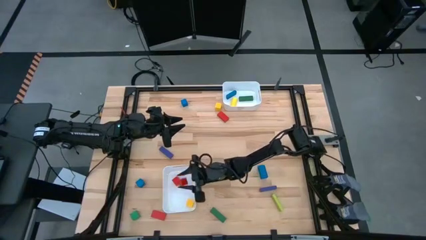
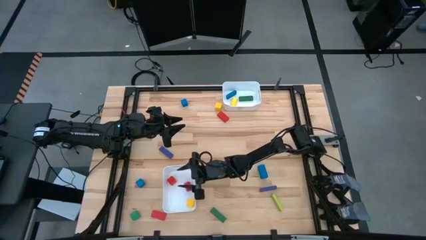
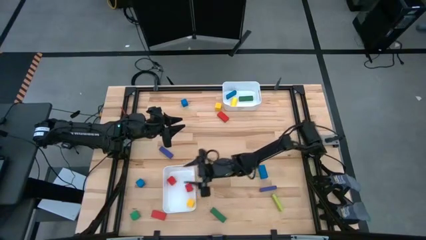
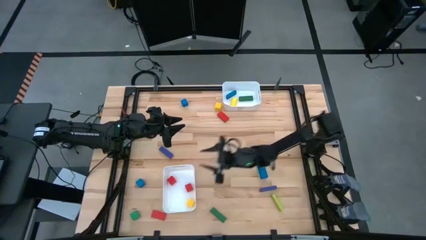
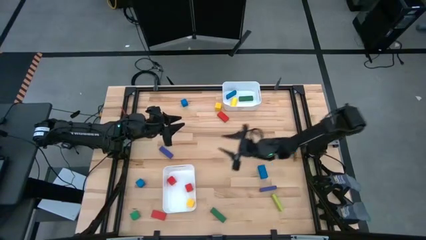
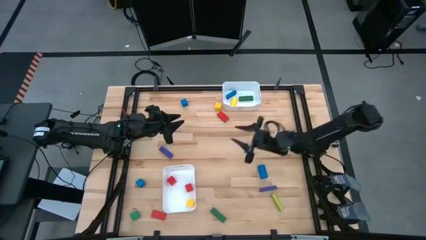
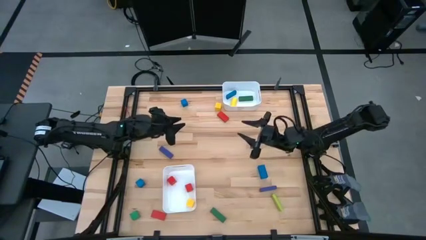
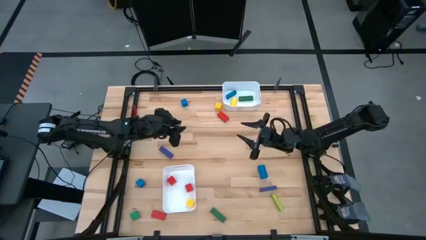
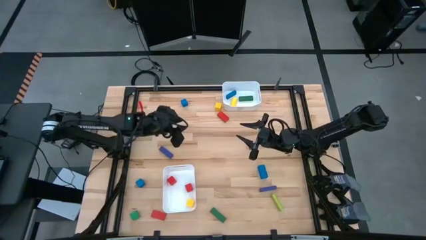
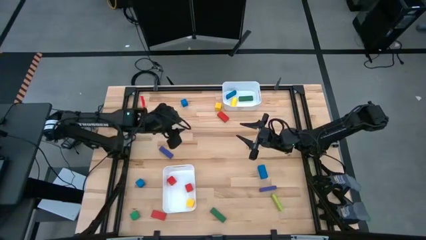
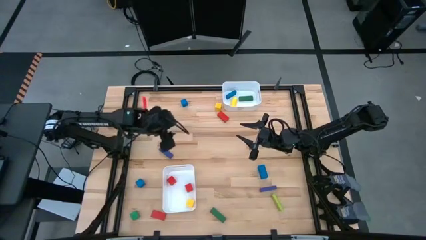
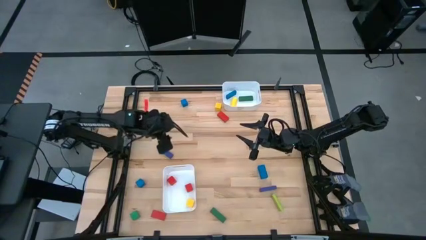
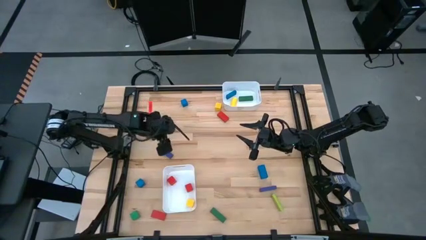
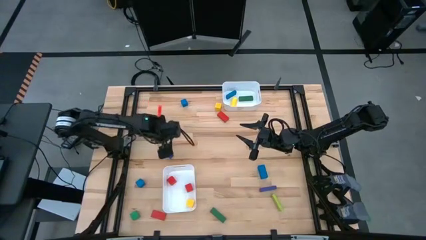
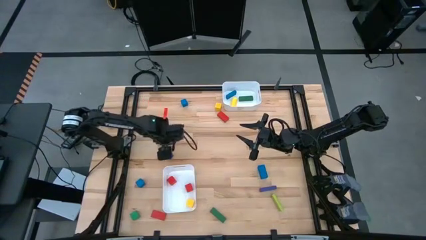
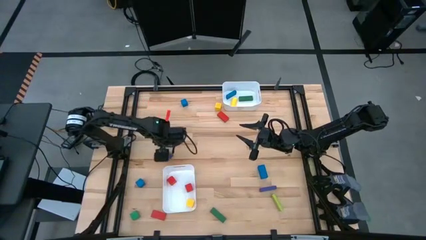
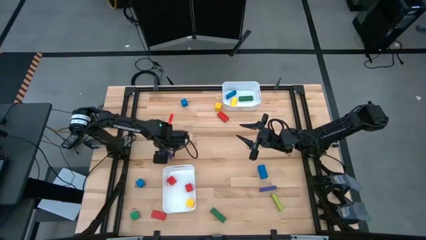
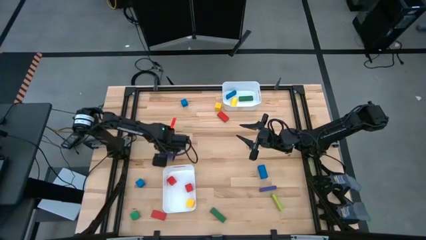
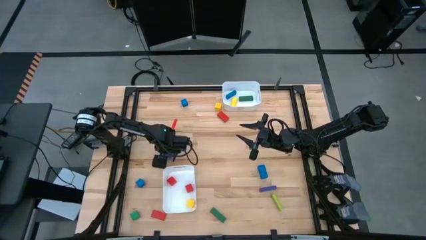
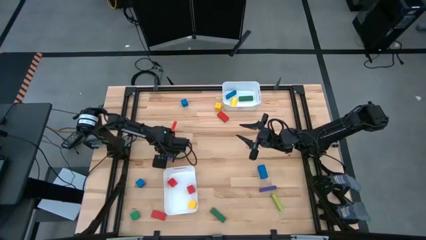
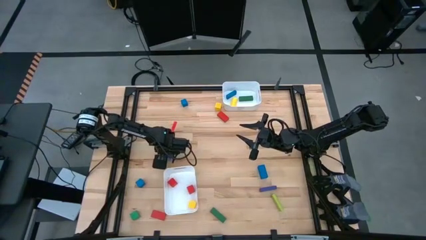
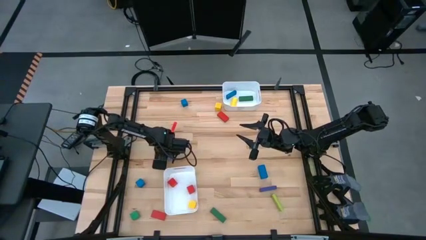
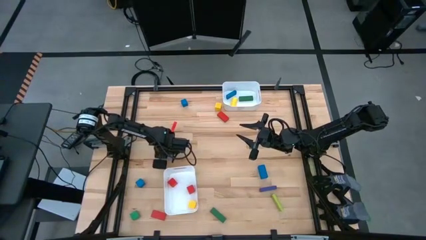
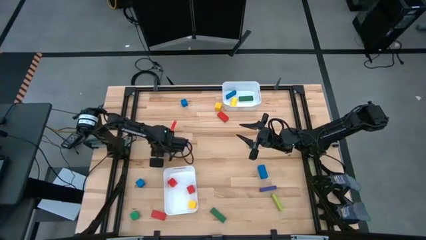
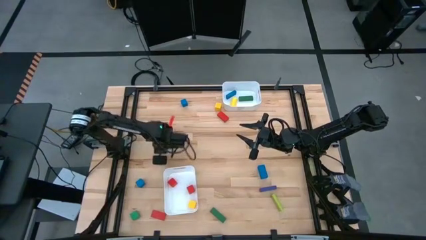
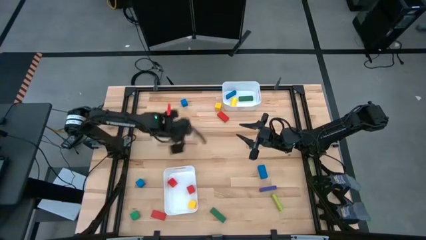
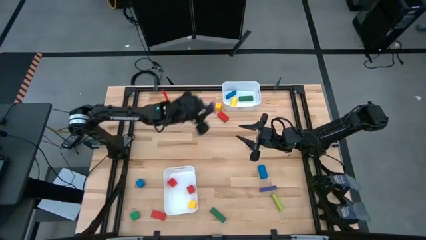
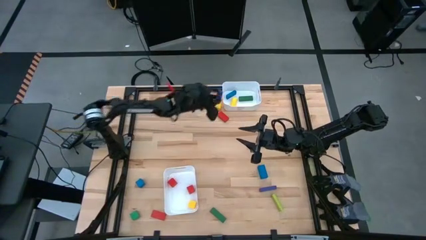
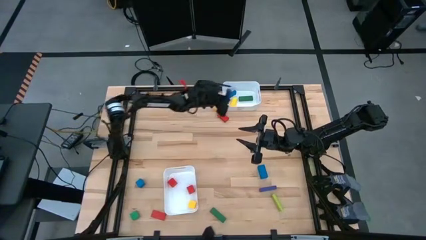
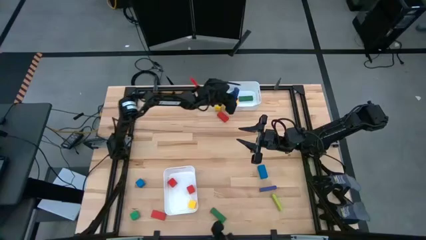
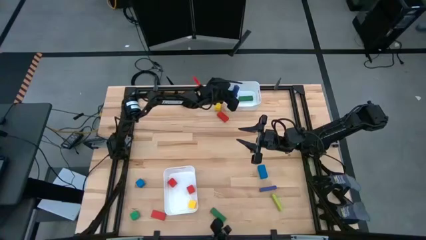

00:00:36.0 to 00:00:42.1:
Task: Sort blocks by size
Put the violet large block into the top white bin

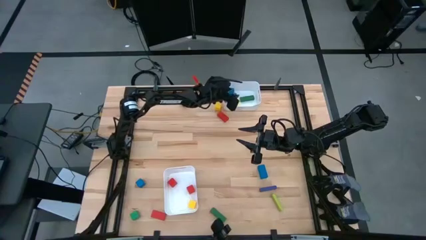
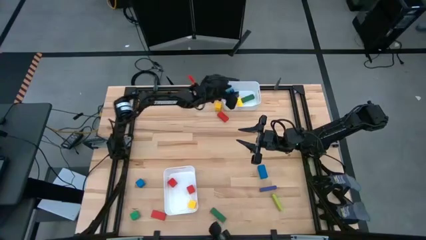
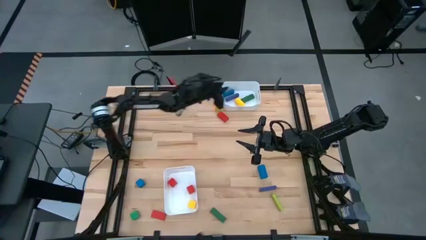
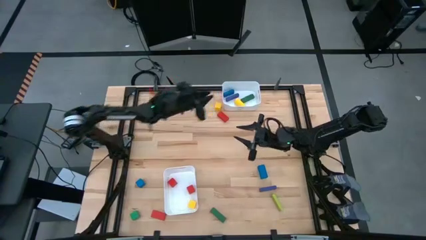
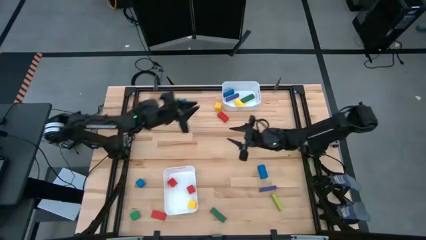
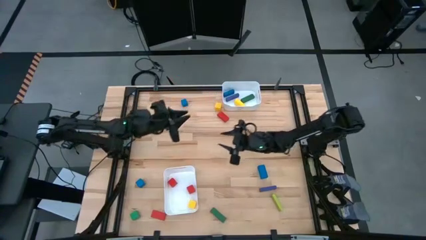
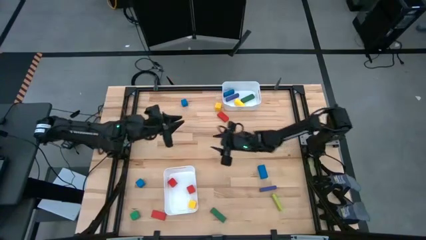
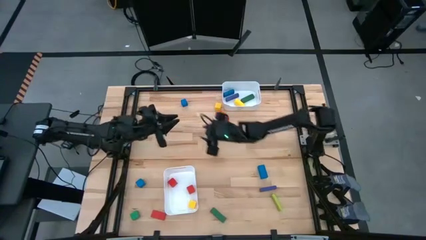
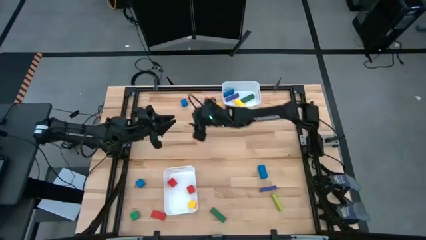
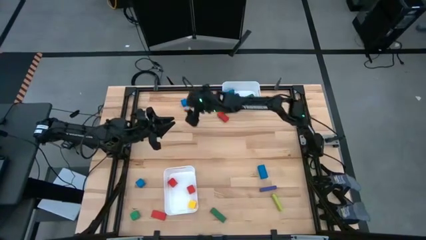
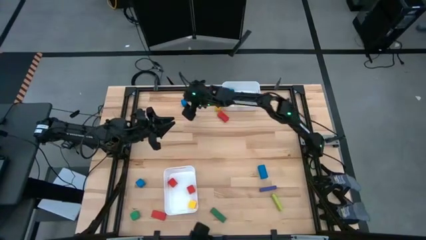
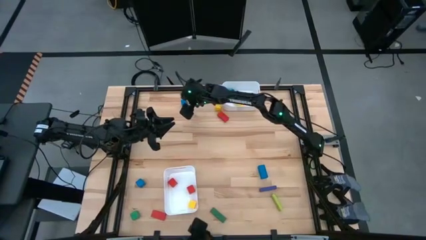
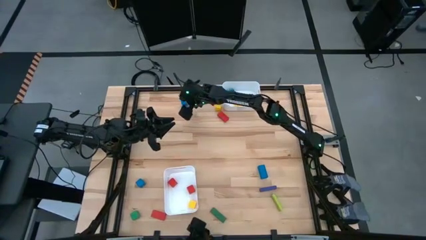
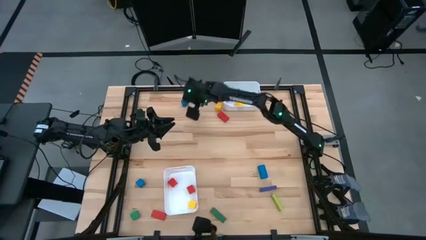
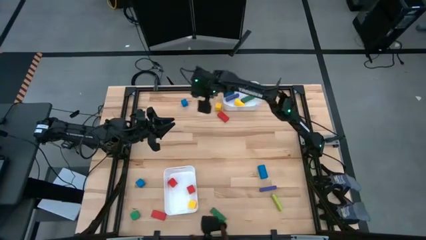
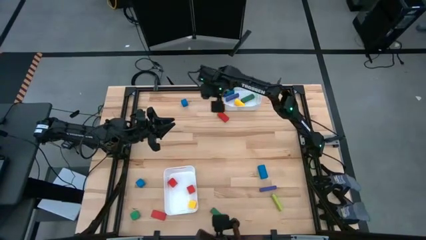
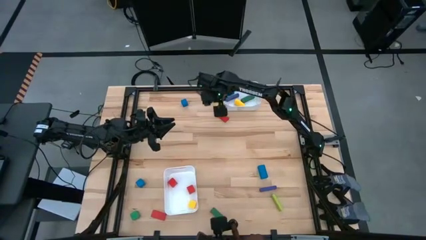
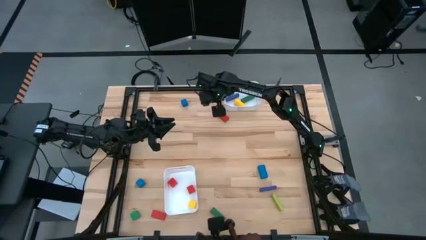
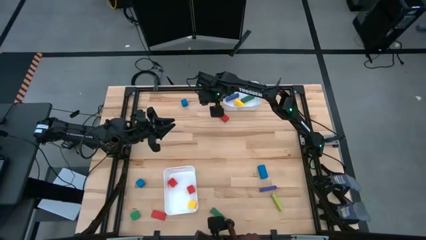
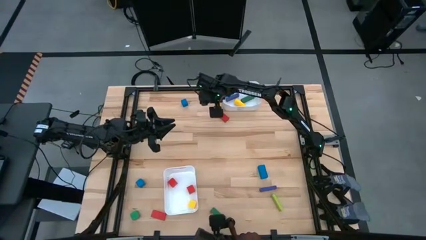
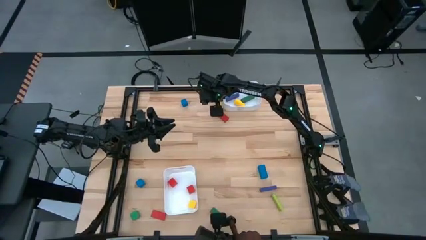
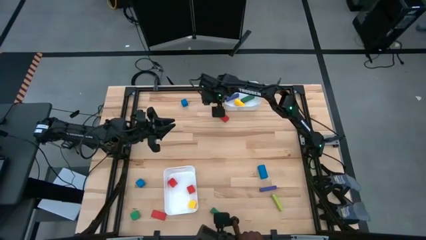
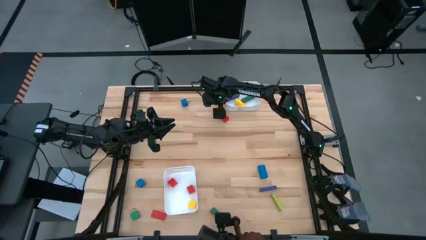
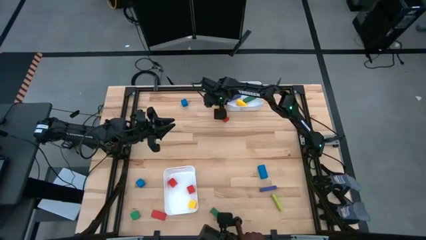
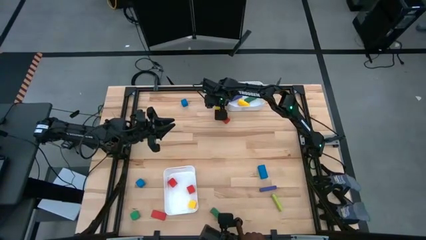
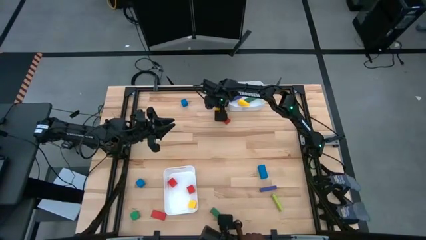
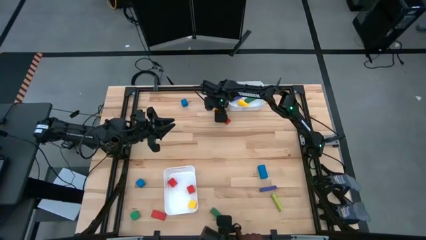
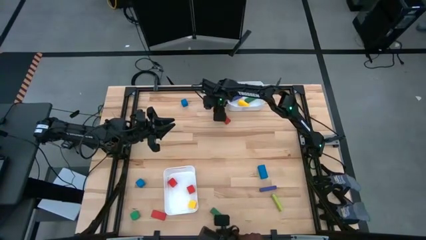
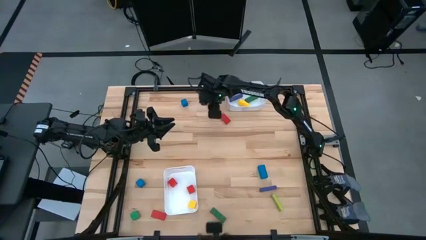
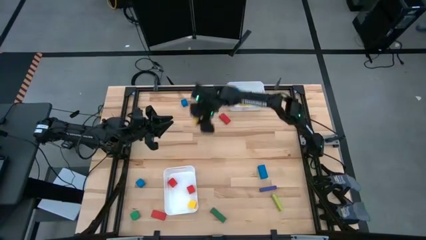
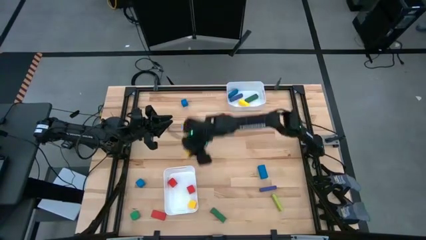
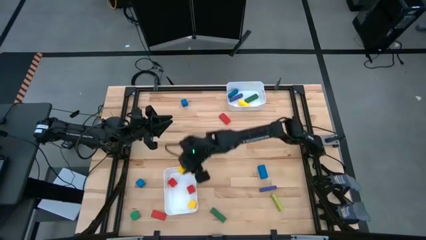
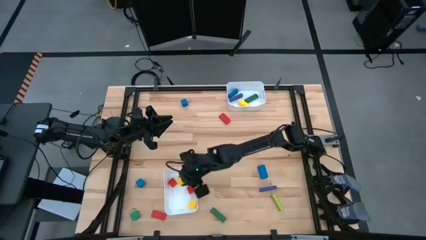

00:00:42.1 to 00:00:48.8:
Put the yellow small block into the bottom white bin

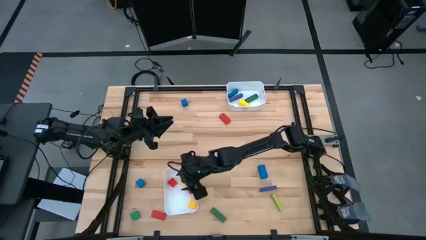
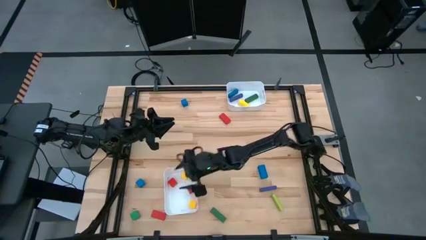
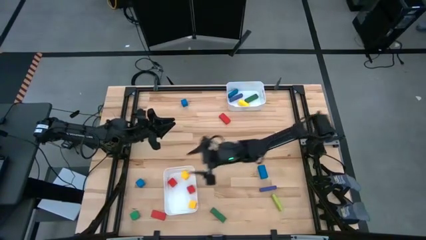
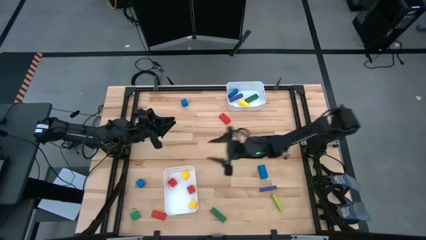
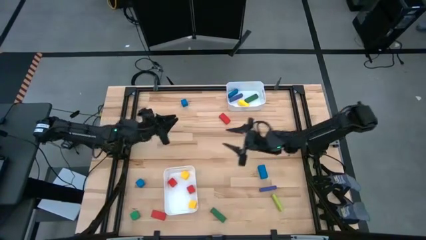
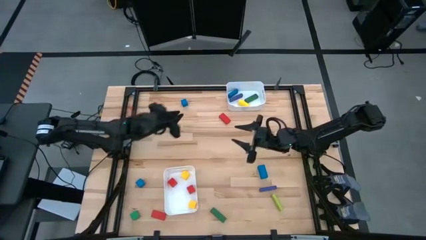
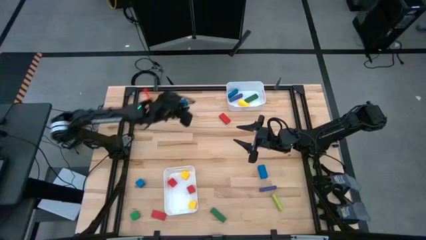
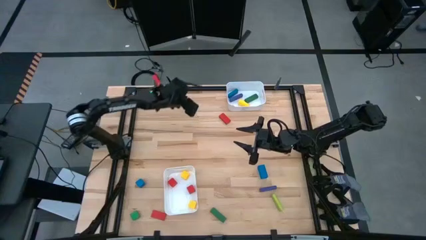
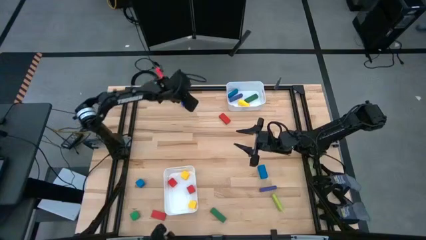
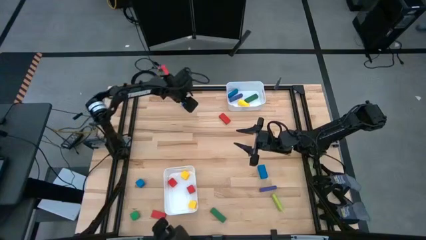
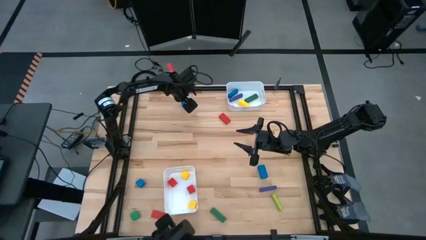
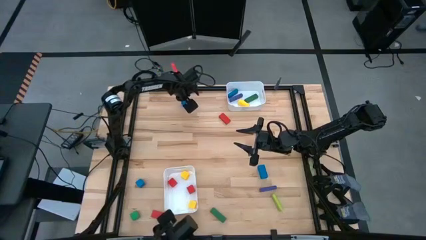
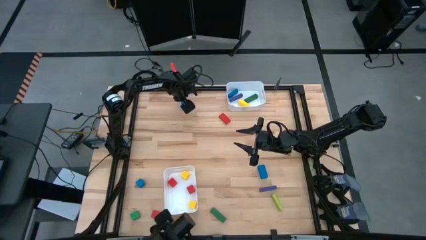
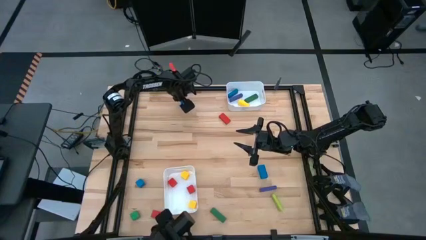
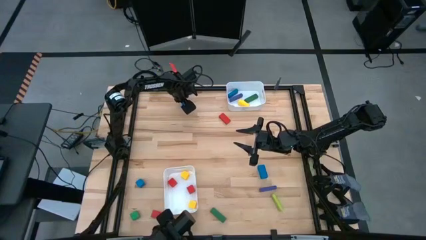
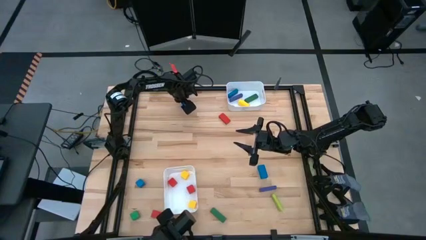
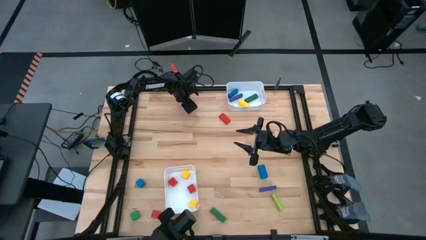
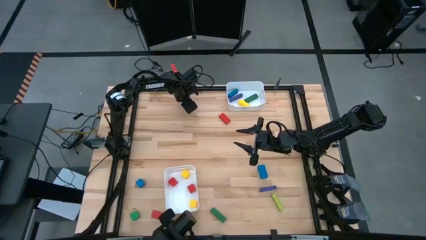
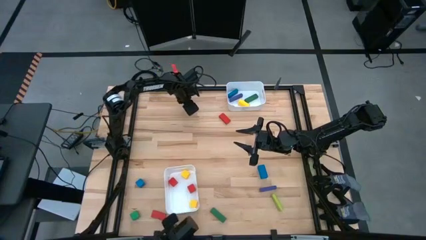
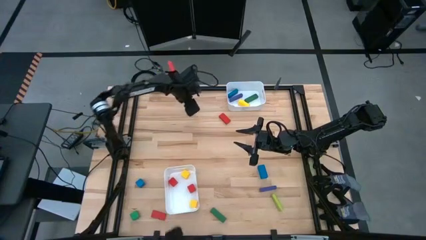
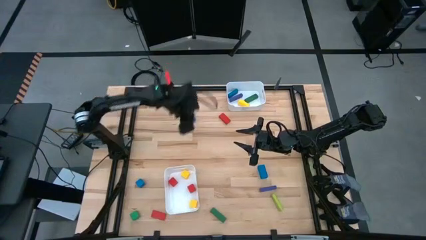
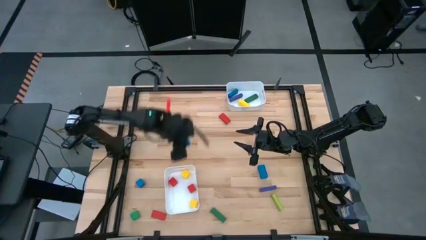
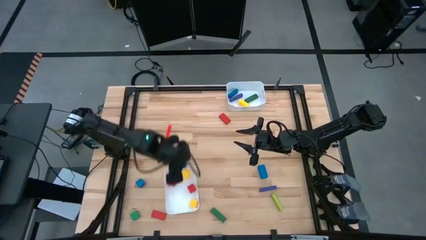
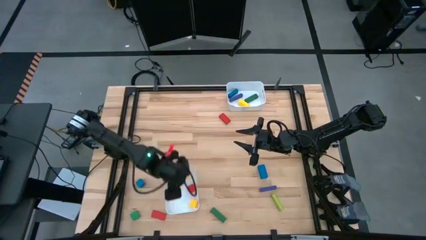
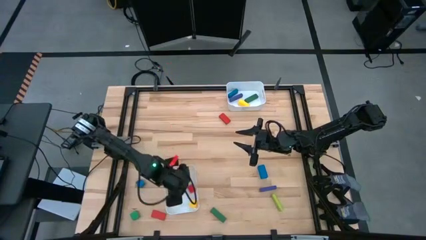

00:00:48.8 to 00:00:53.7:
Put the blue small block into the bottom white bin
